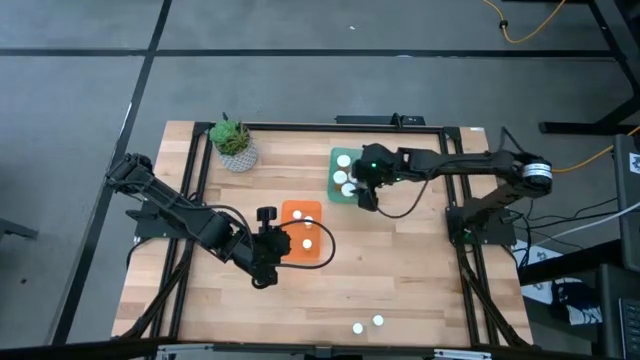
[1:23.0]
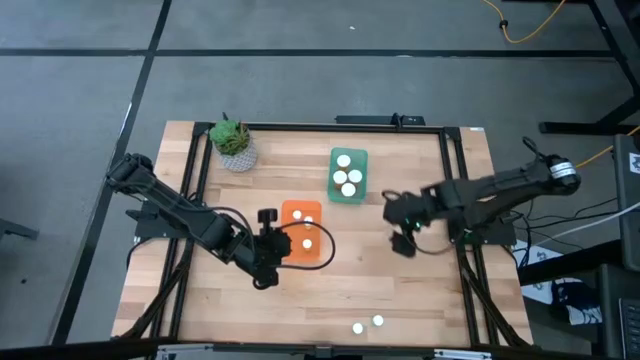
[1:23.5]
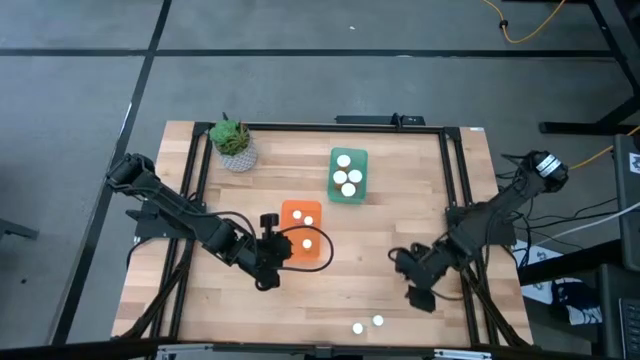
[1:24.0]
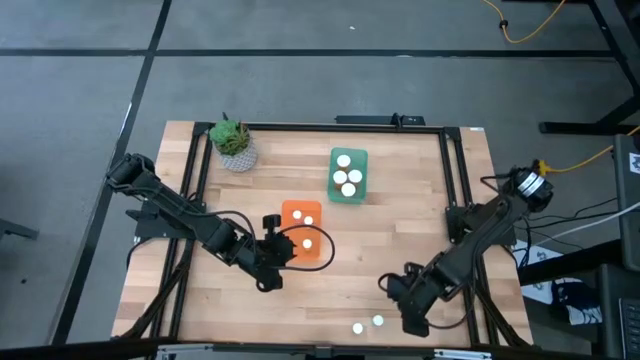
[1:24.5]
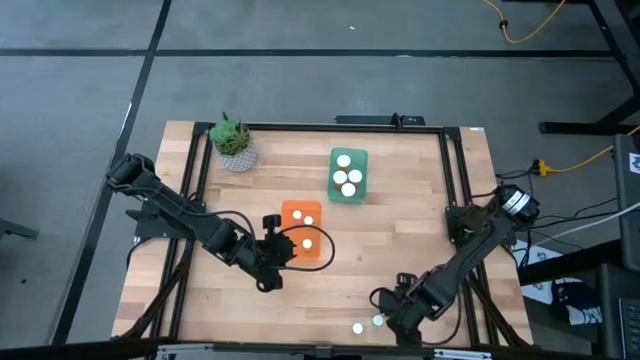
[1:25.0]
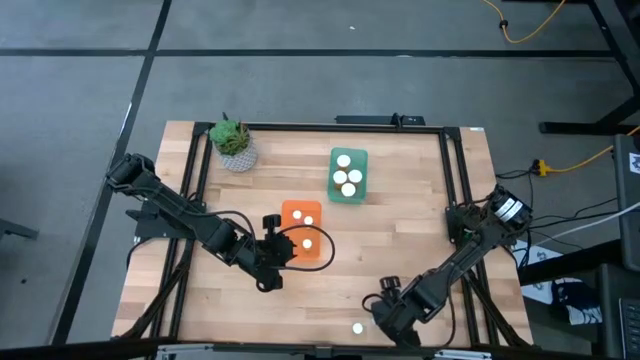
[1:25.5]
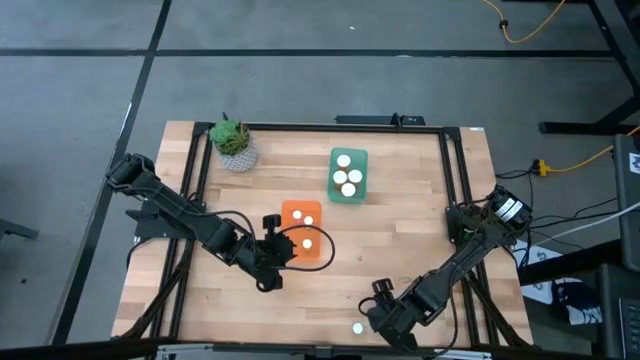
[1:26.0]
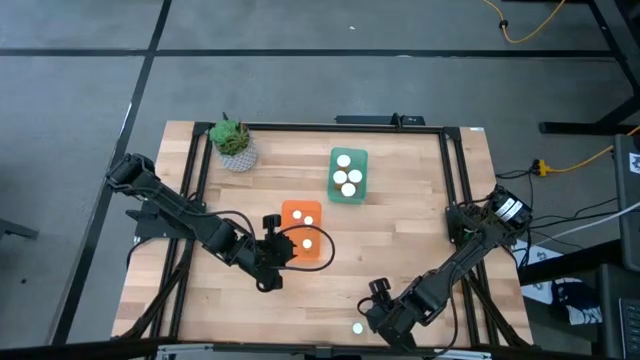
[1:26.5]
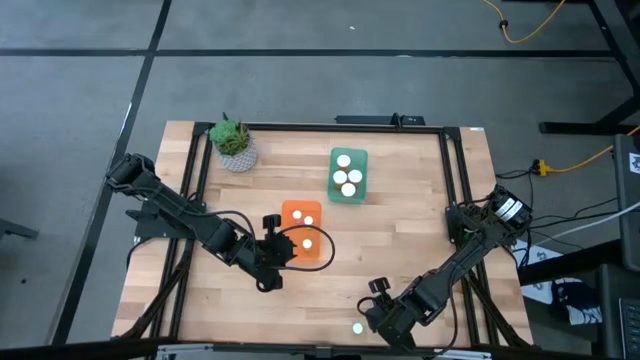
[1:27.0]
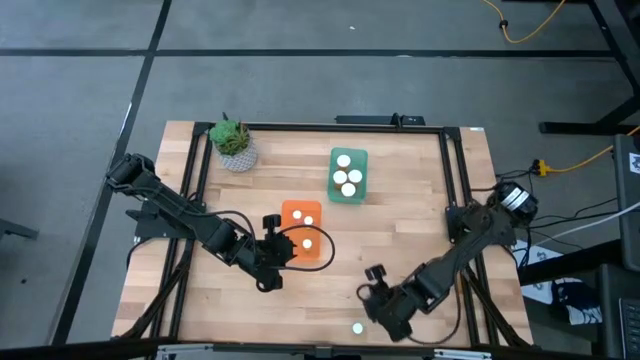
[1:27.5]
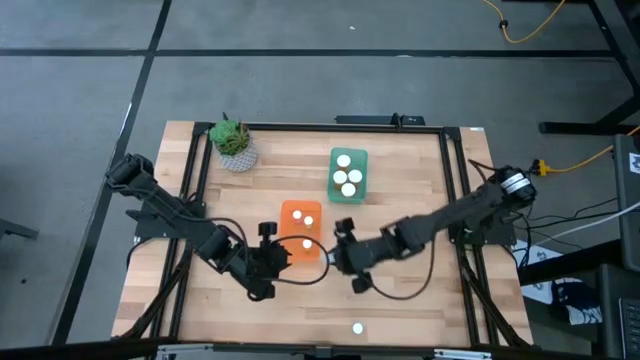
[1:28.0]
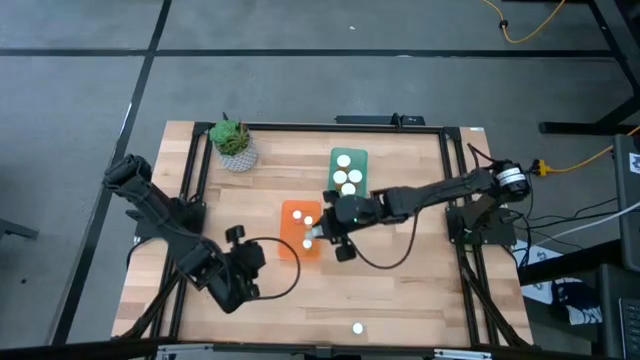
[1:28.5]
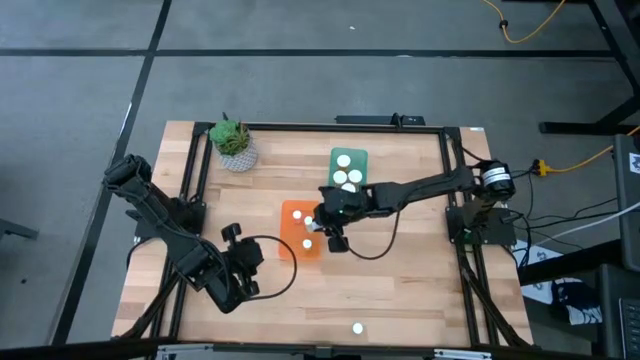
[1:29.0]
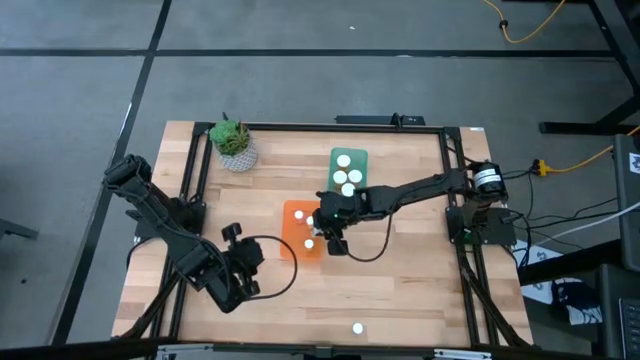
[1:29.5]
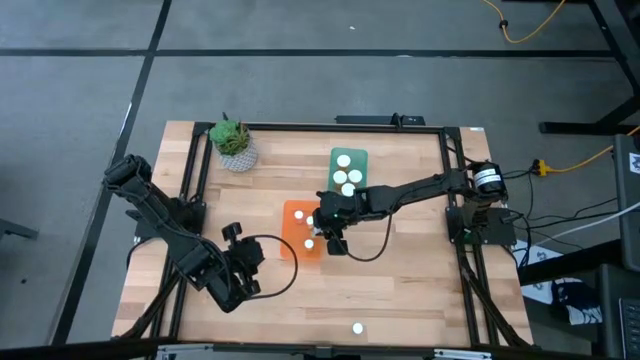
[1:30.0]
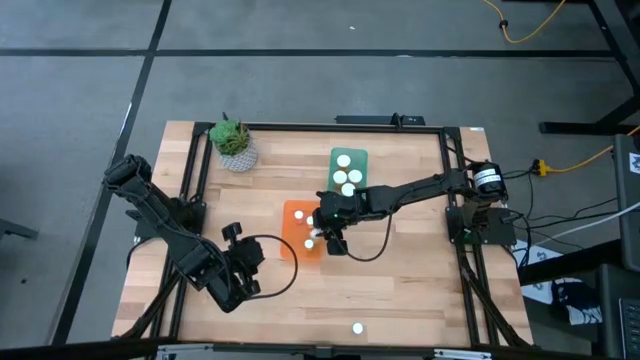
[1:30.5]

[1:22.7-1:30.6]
Task: Pick and place medicine bottles into bin by pill shape (circle, oval)
Put the small blue pill bottle into the orange bin

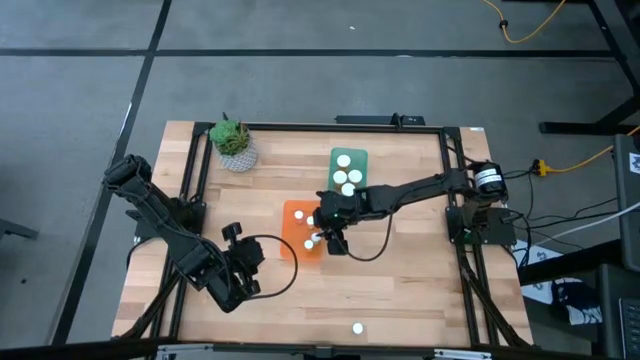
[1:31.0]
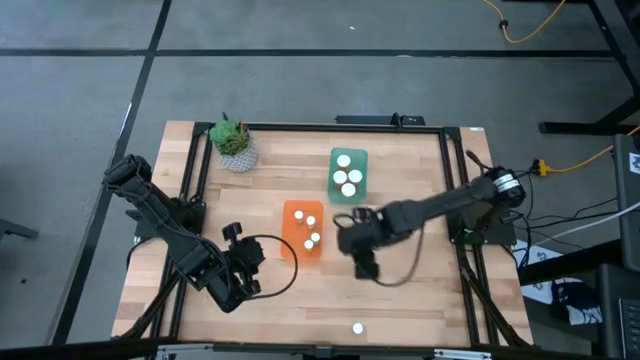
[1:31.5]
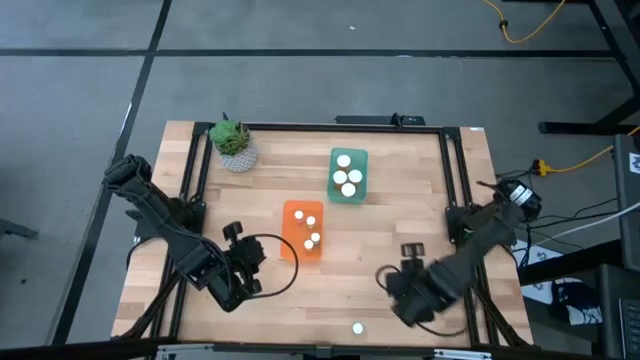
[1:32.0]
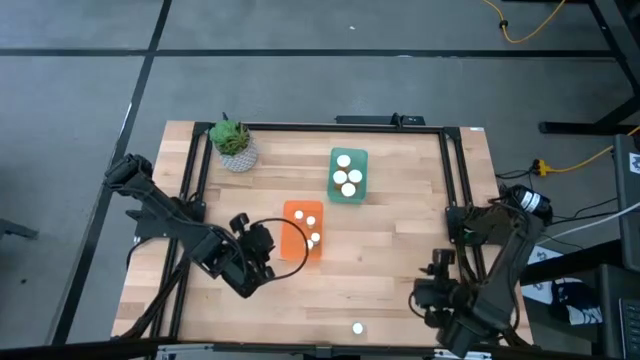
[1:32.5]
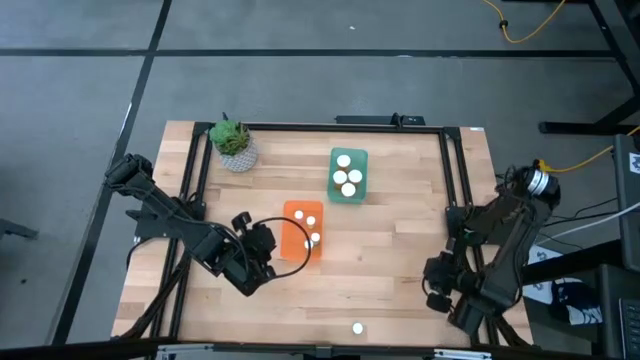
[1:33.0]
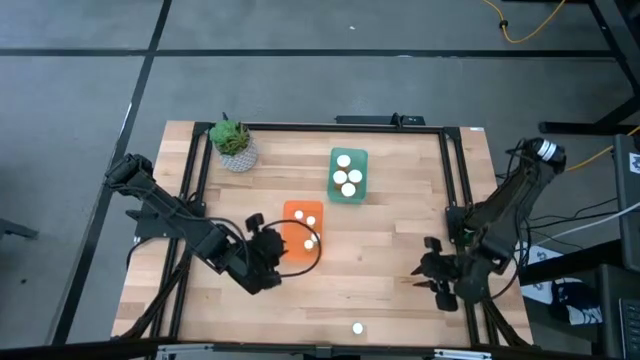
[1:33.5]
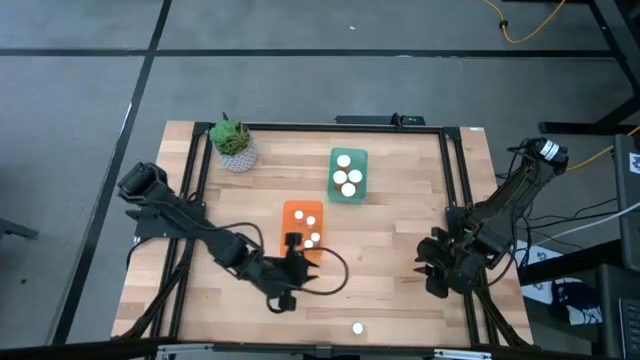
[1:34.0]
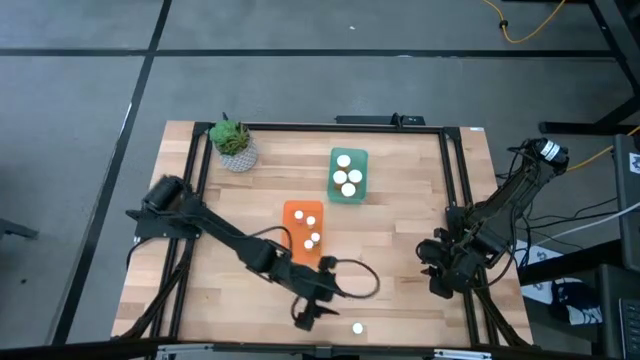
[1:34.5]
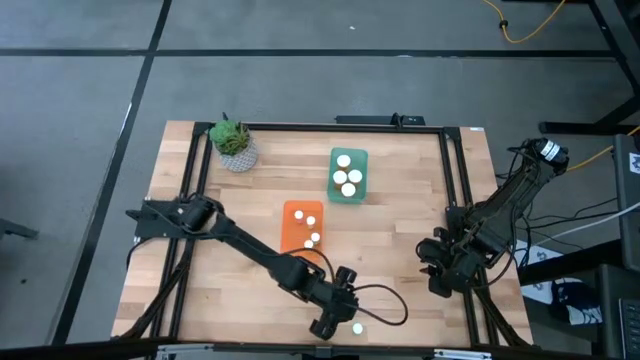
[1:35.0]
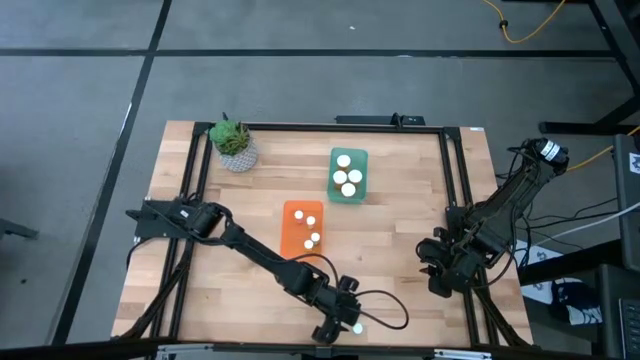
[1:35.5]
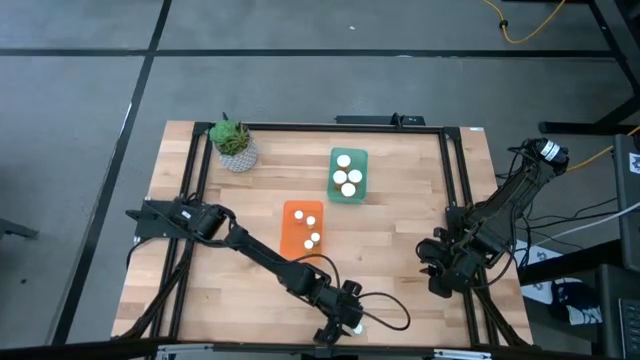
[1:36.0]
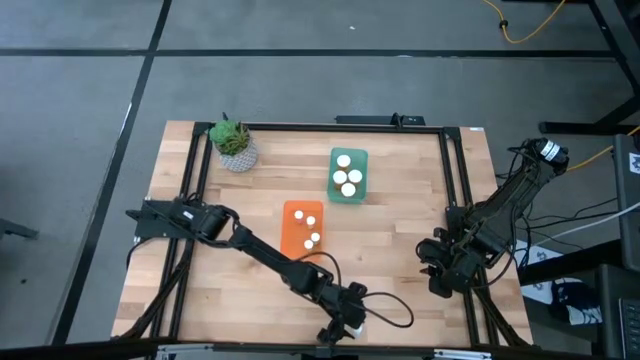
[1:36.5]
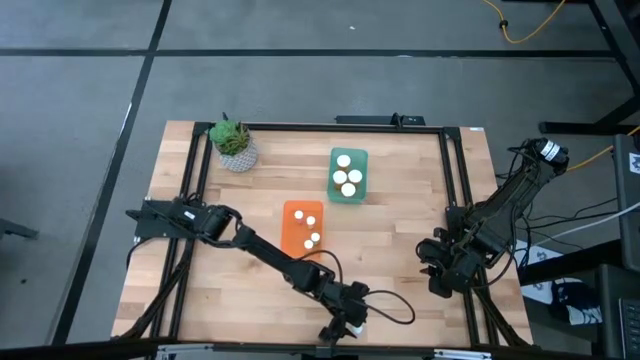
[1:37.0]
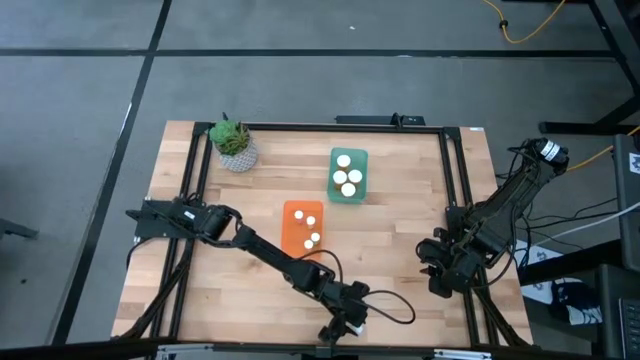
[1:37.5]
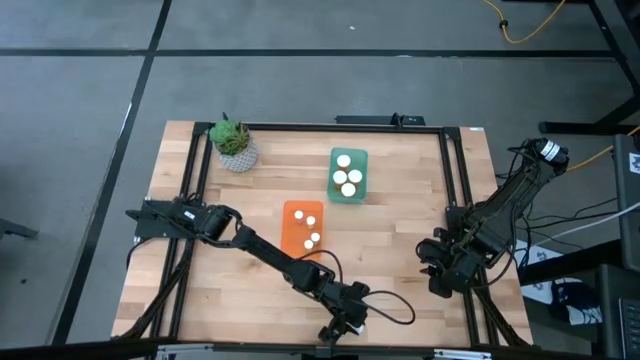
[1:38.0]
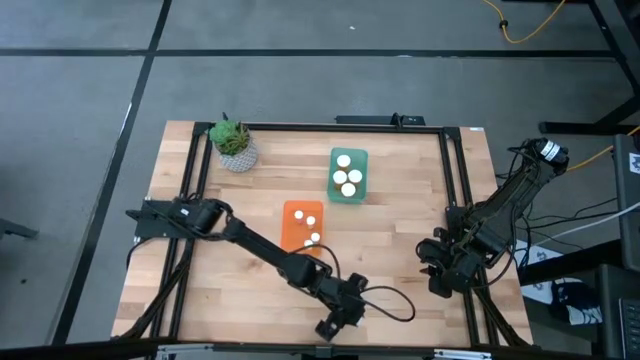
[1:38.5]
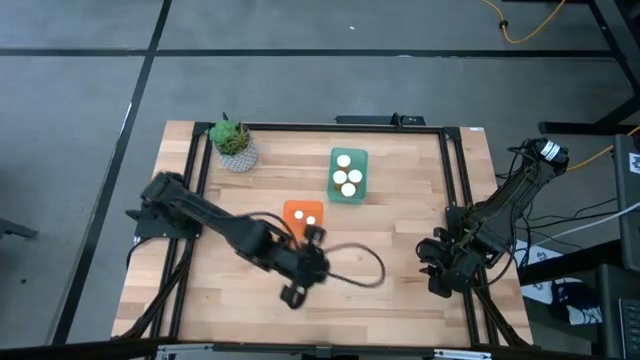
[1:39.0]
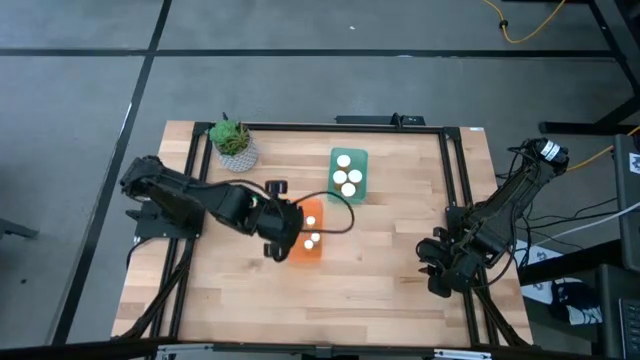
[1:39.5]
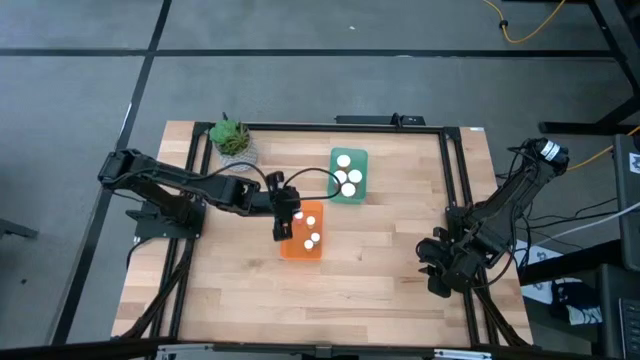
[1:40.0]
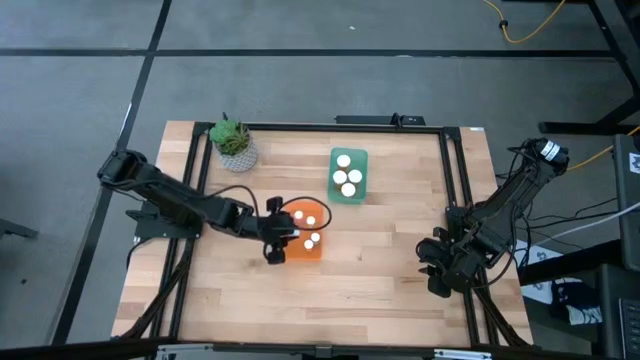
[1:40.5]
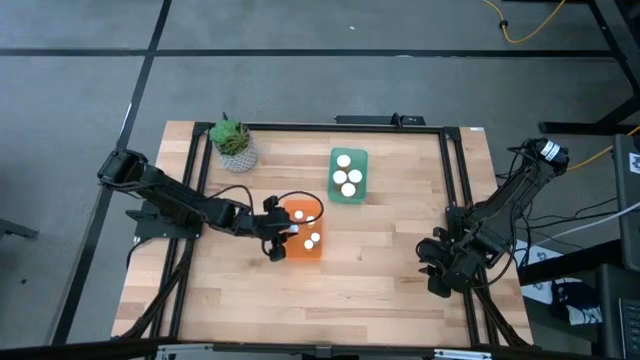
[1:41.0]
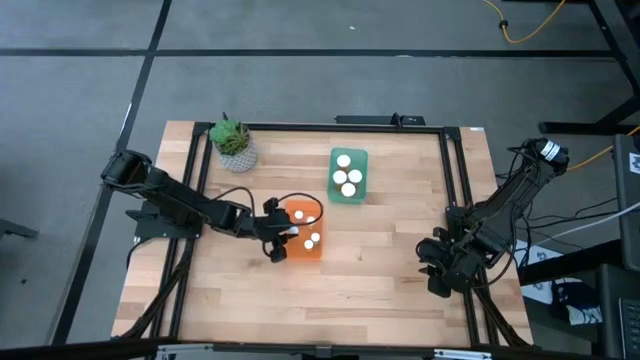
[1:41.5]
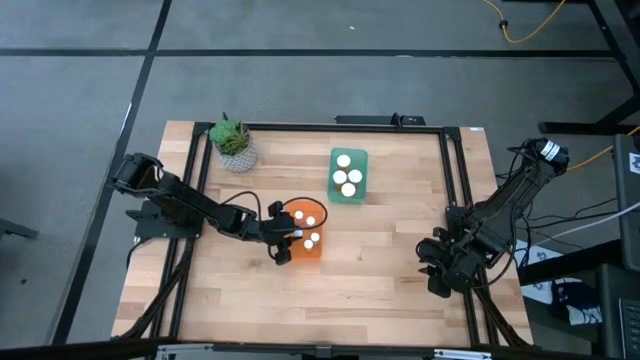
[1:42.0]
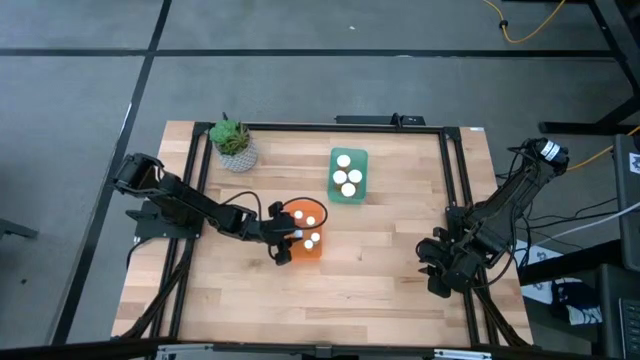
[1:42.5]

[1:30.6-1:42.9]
Put the small blue pill bottle into the orange bin
